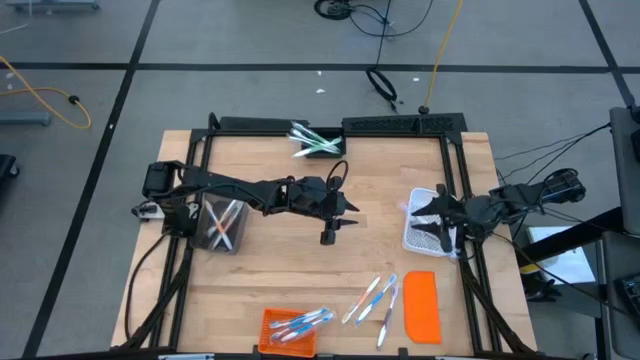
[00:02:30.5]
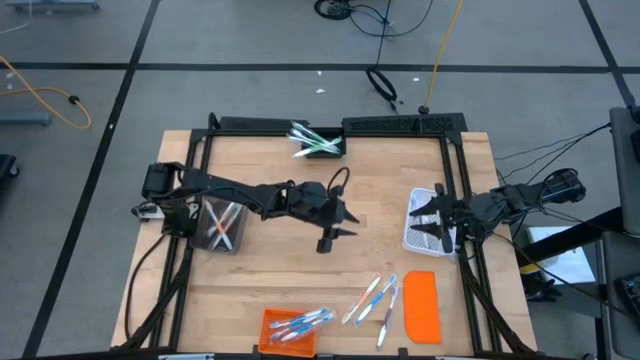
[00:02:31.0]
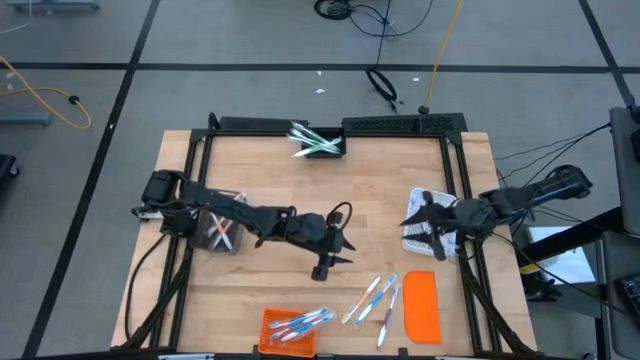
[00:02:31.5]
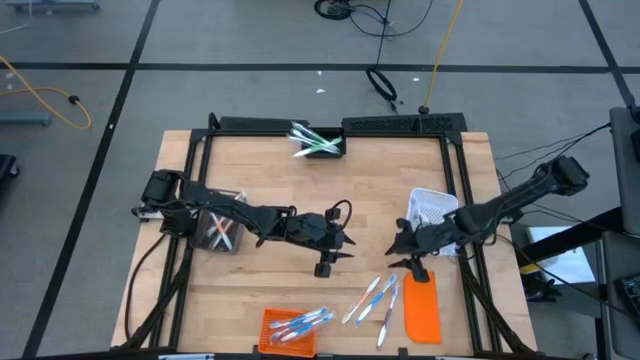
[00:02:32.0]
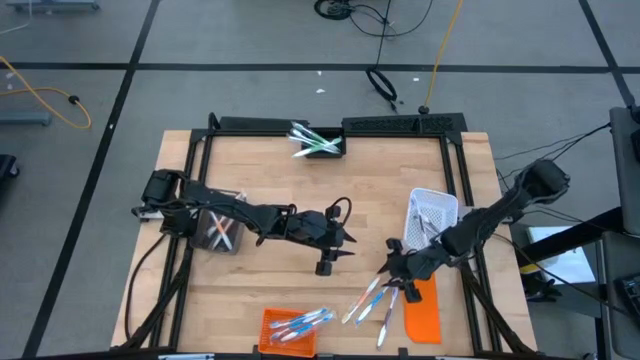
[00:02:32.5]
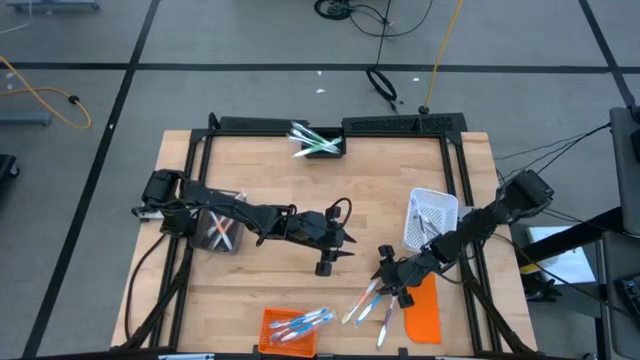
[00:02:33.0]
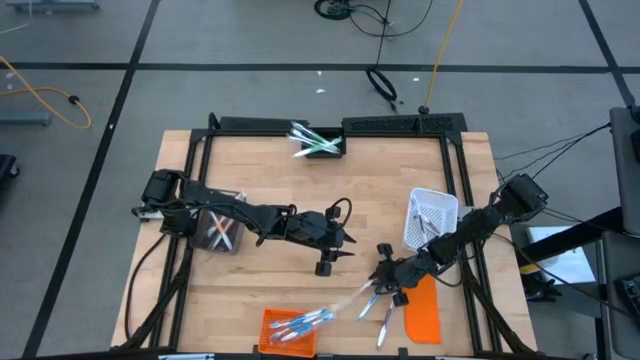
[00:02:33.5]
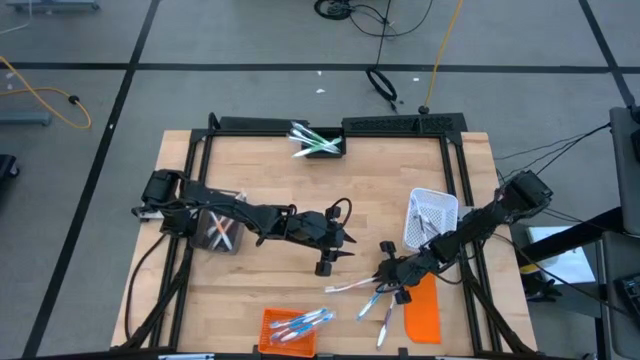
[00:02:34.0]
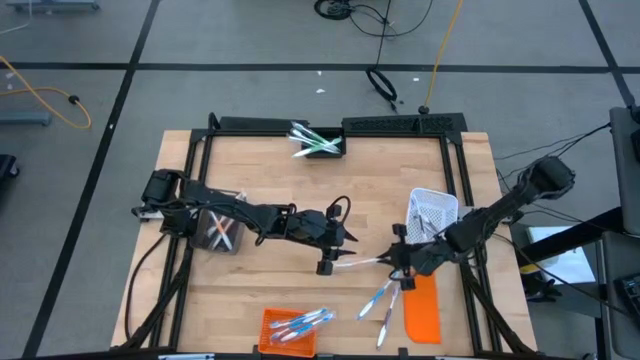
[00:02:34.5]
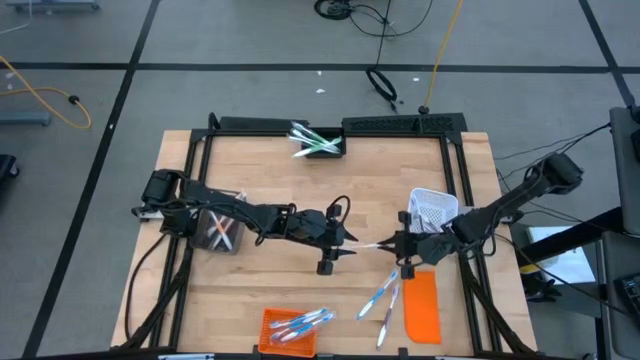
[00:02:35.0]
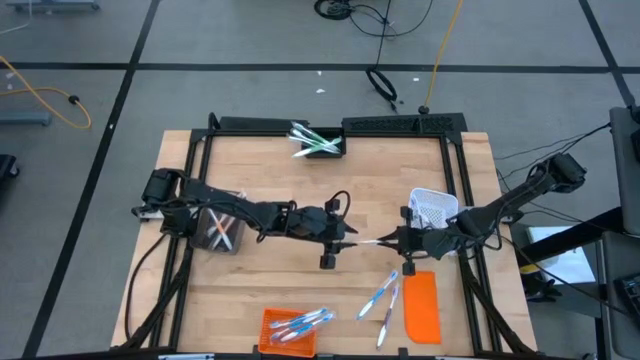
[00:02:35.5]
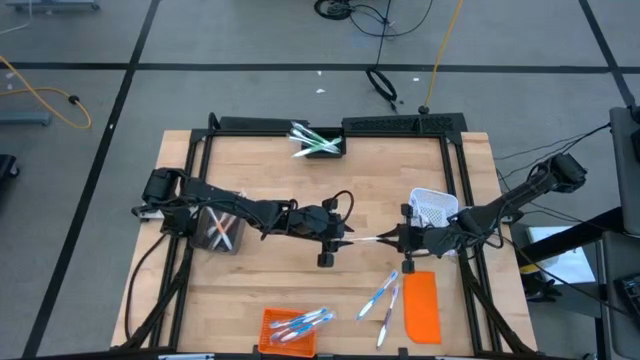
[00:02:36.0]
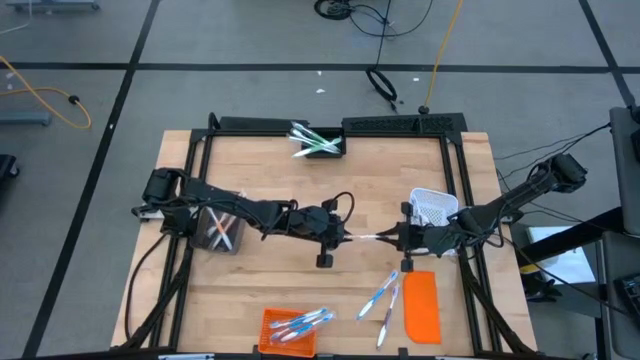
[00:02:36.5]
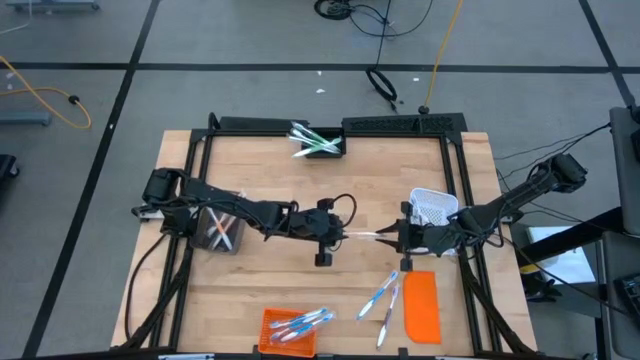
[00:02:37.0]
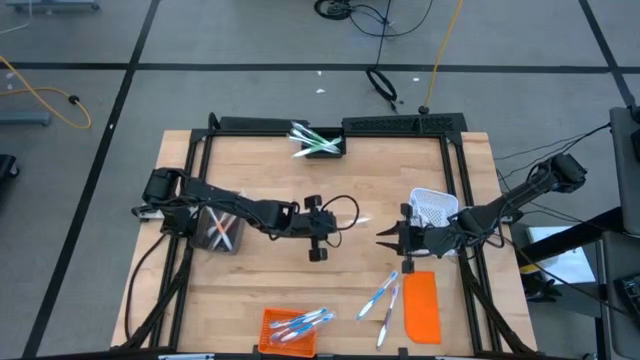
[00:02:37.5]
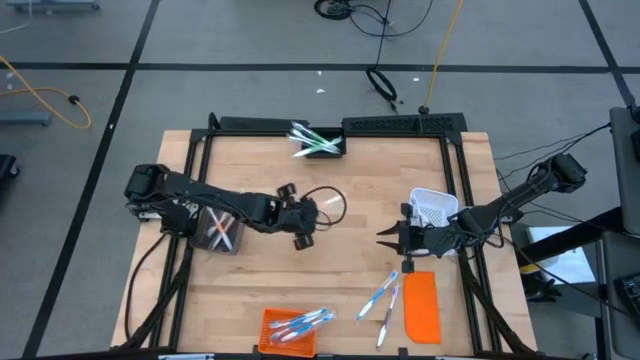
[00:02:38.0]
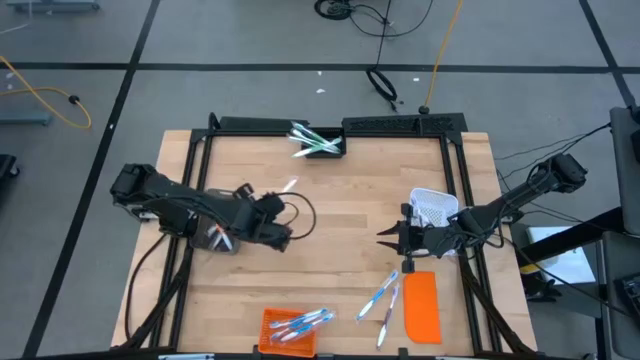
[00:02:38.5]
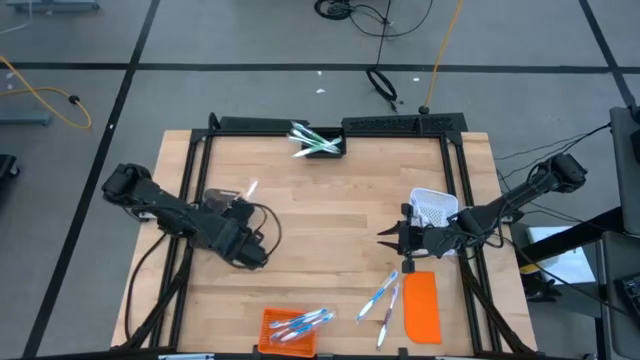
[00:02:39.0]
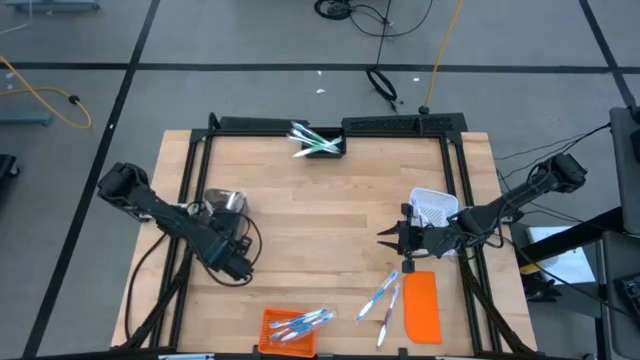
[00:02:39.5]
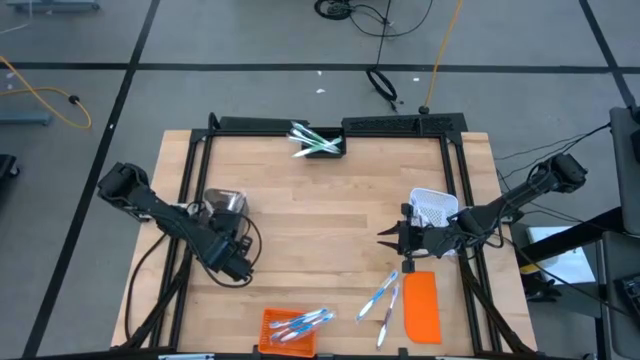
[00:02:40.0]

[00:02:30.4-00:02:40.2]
Task: Pick & Place Toothbrushes
Put the orange toothbrush into the transparent black bin

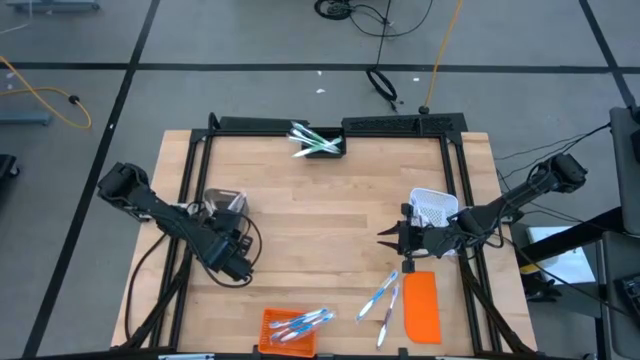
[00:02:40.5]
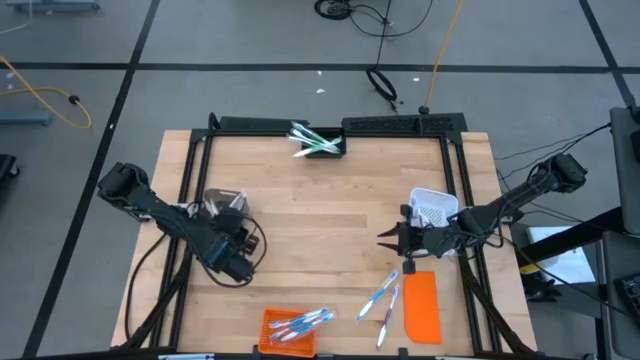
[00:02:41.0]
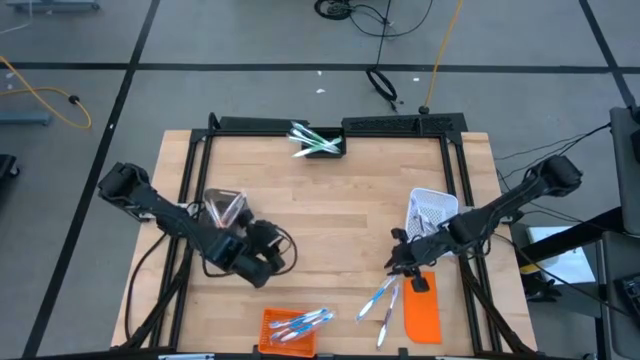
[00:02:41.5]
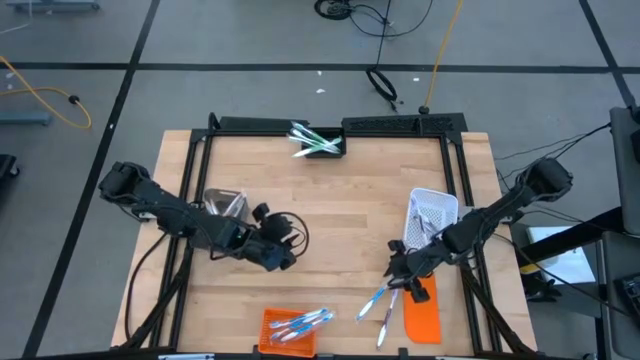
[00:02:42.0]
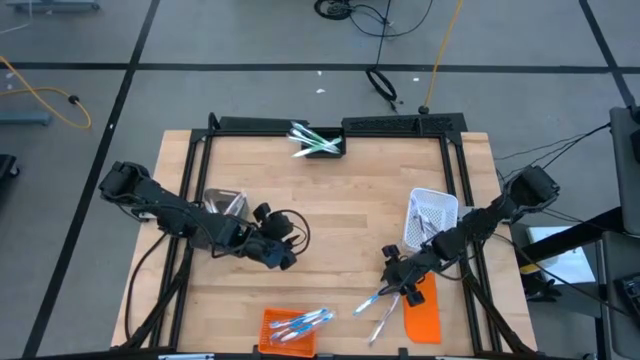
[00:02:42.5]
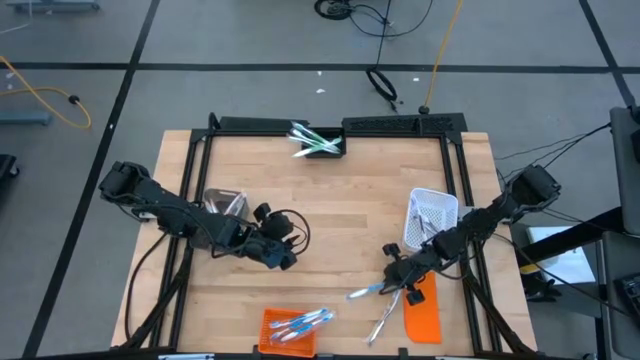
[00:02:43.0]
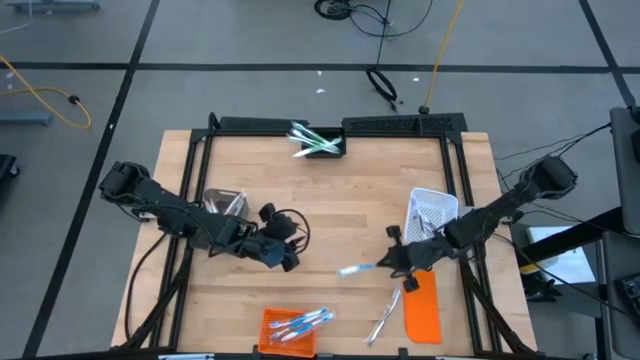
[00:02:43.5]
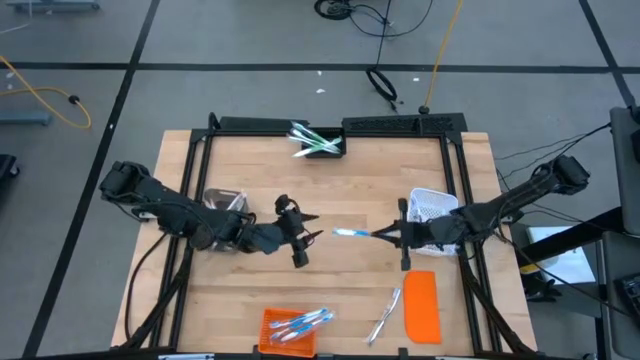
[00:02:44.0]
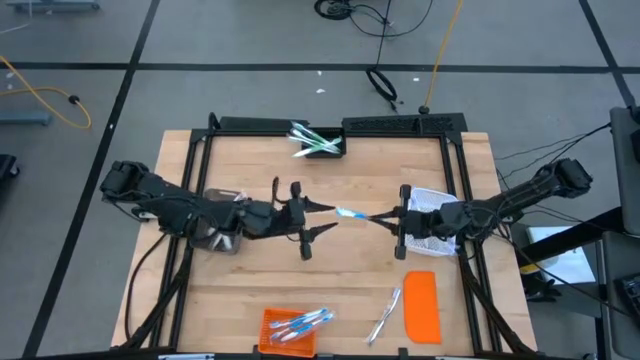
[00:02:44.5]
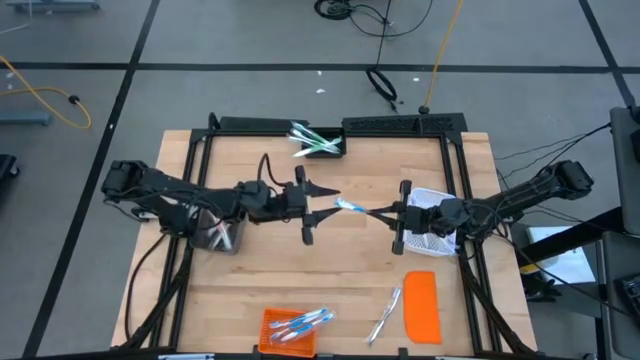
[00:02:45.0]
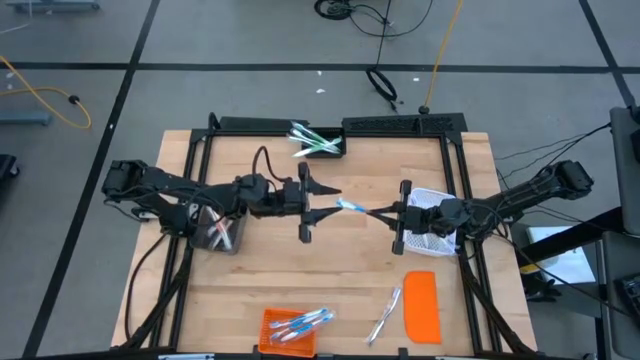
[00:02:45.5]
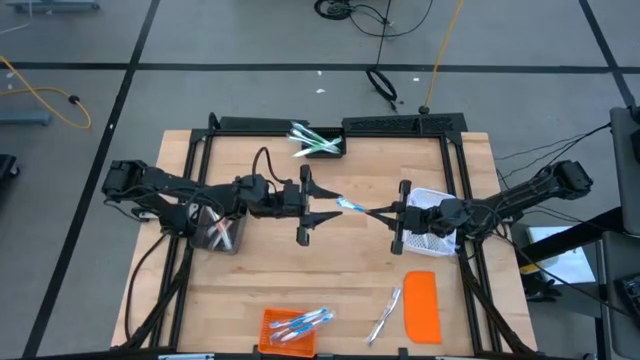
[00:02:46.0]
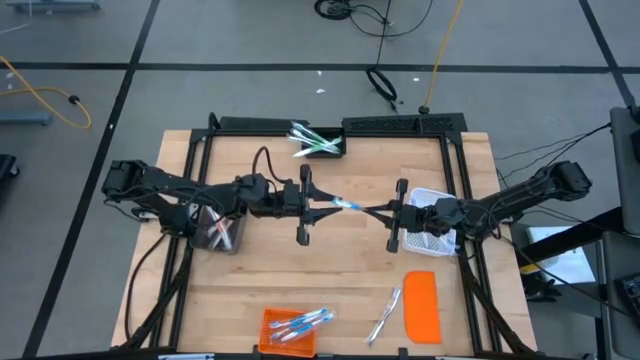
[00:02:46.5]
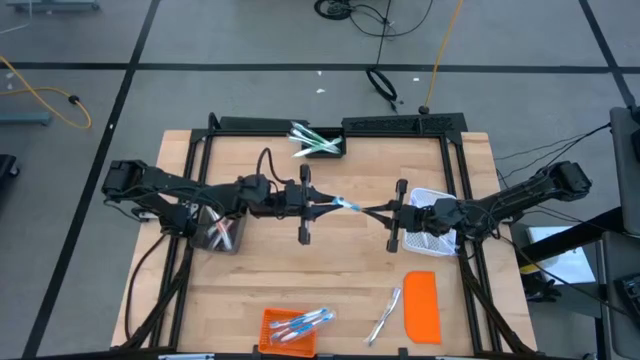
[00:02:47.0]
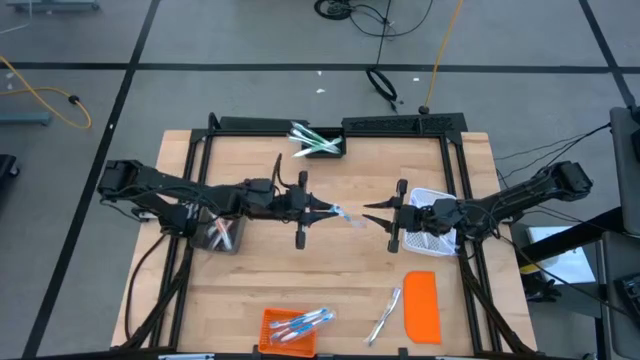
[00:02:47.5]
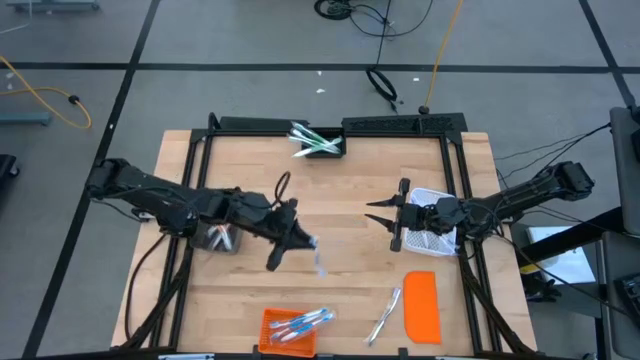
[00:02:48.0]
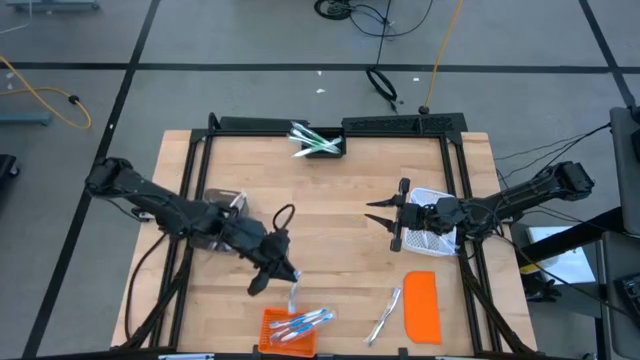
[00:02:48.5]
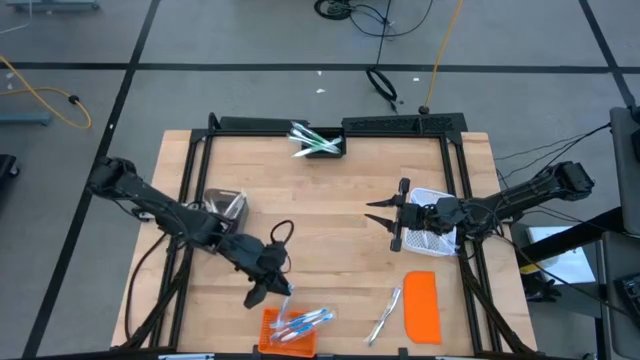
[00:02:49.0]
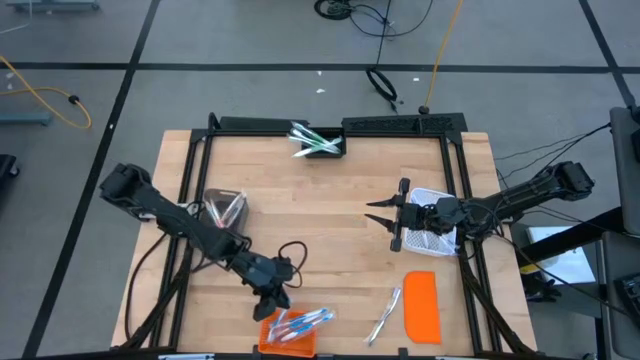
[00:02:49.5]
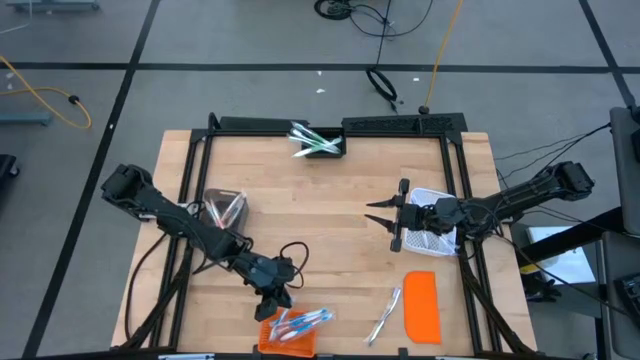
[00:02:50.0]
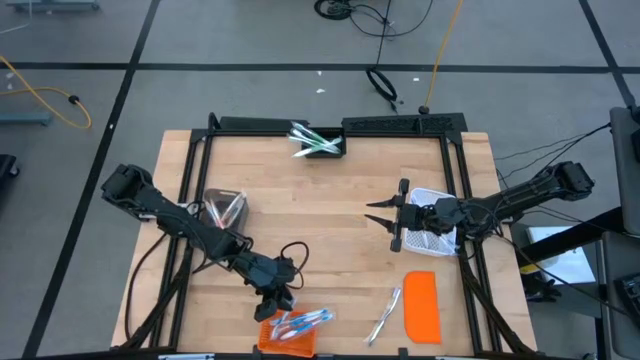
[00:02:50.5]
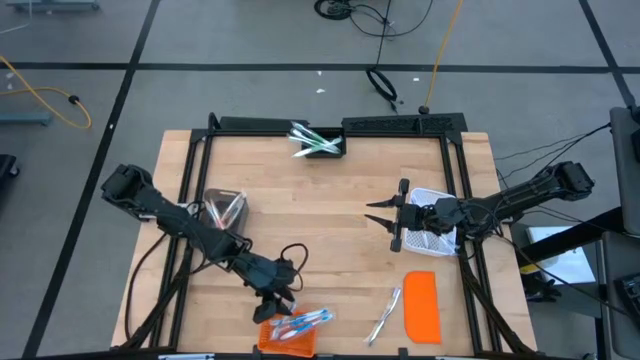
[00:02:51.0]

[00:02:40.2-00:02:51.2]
Put the blue toothbrush into the orange bin
